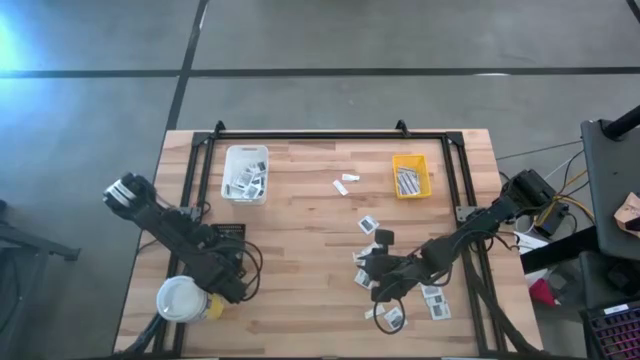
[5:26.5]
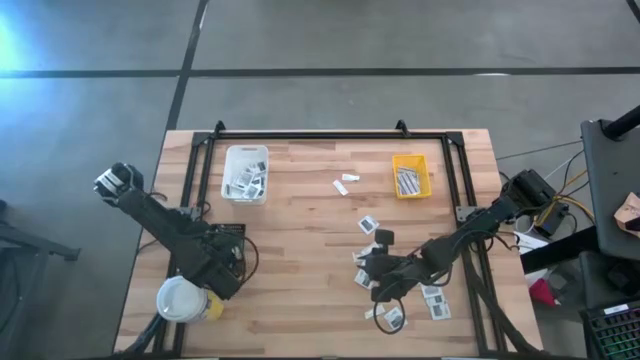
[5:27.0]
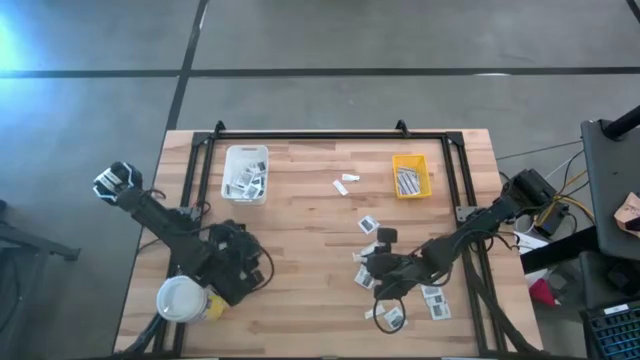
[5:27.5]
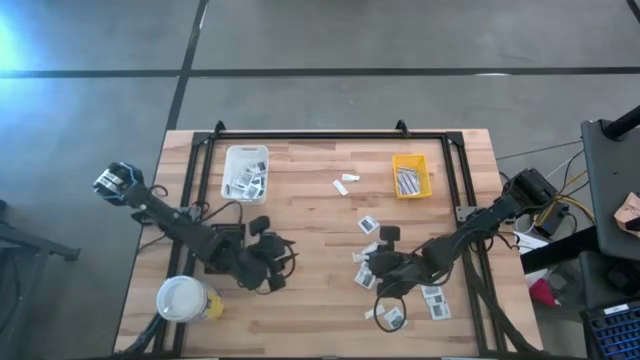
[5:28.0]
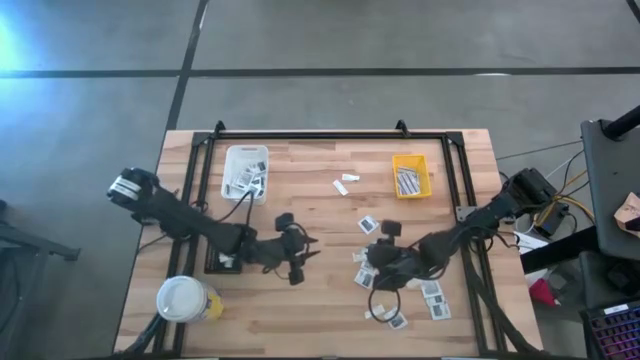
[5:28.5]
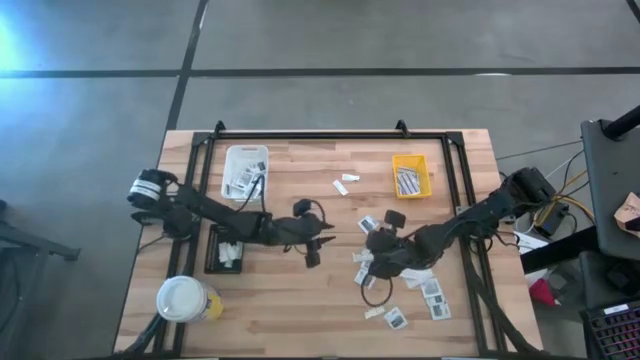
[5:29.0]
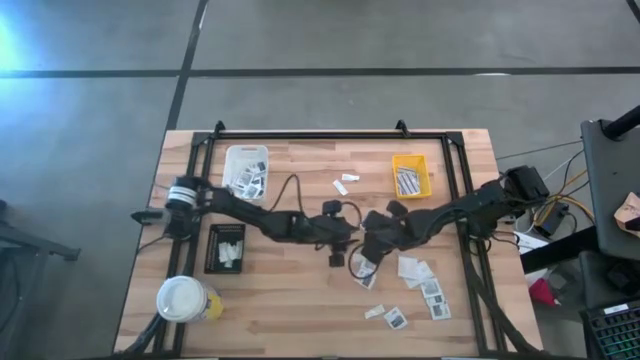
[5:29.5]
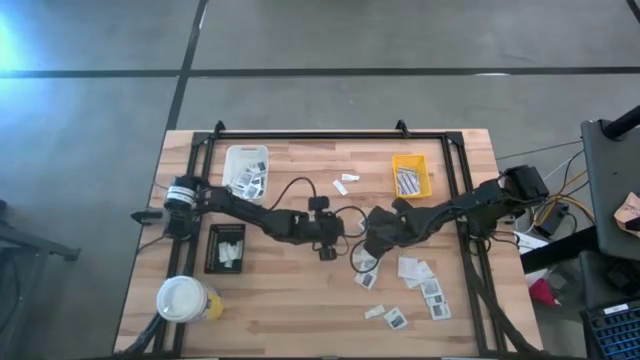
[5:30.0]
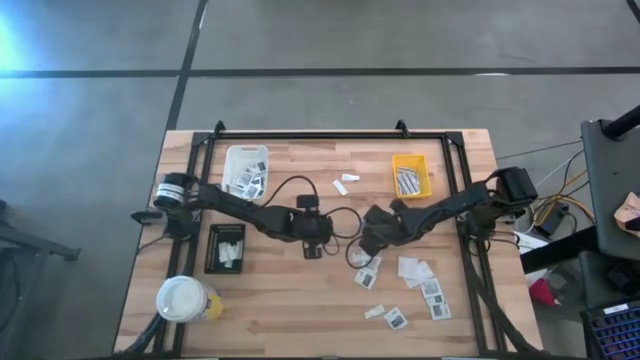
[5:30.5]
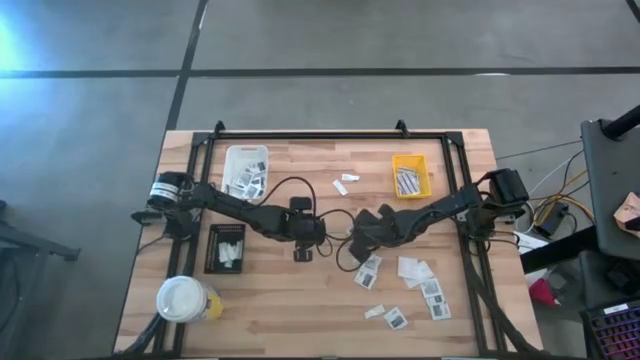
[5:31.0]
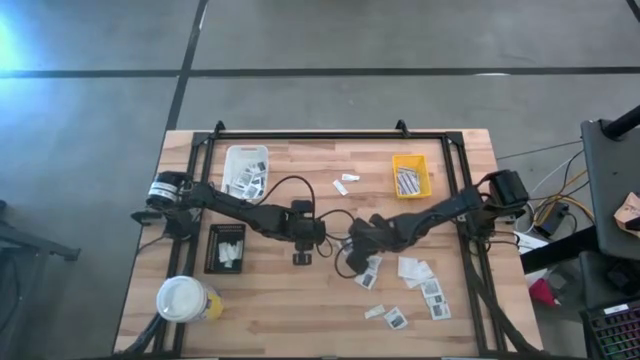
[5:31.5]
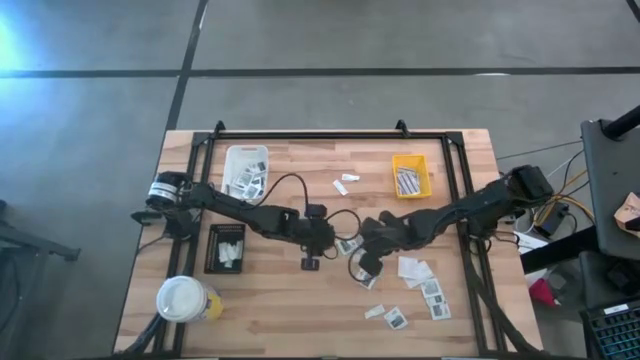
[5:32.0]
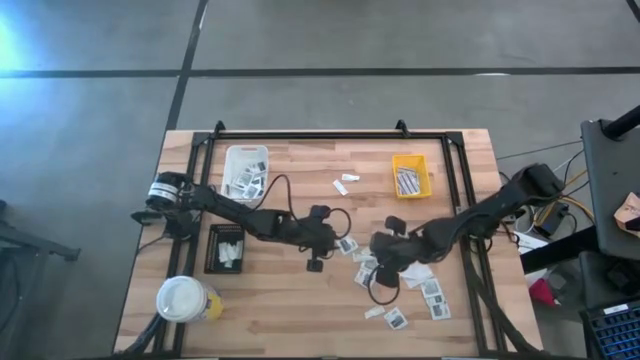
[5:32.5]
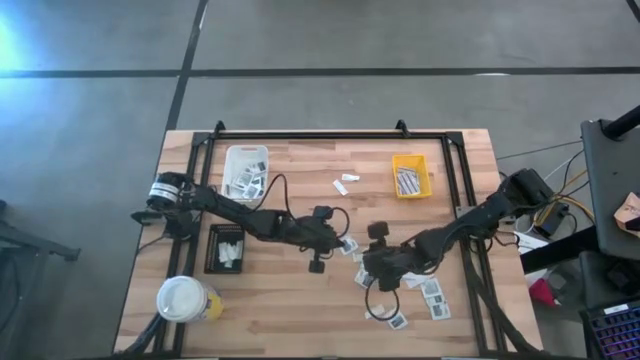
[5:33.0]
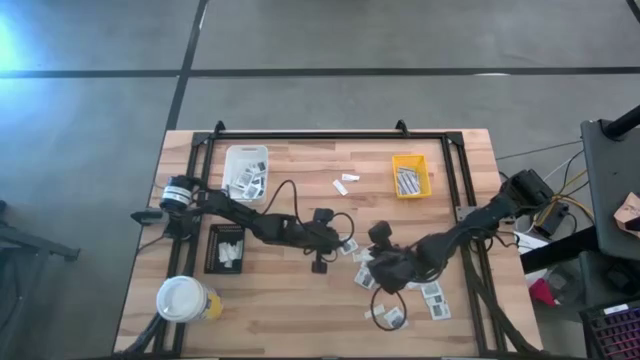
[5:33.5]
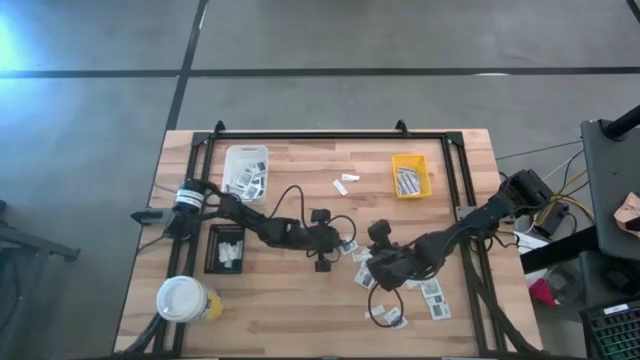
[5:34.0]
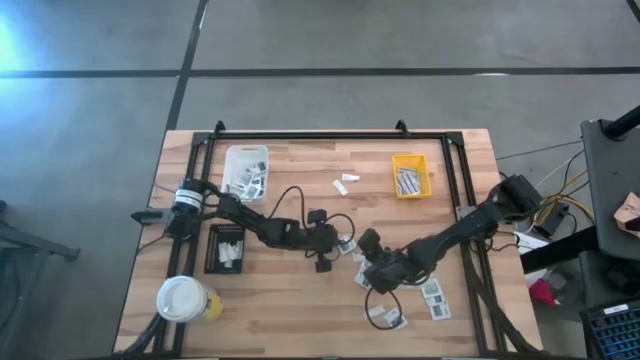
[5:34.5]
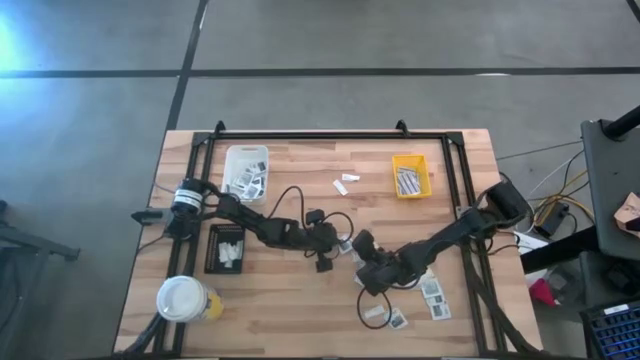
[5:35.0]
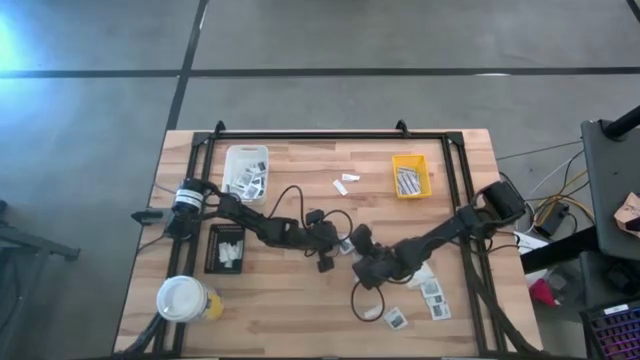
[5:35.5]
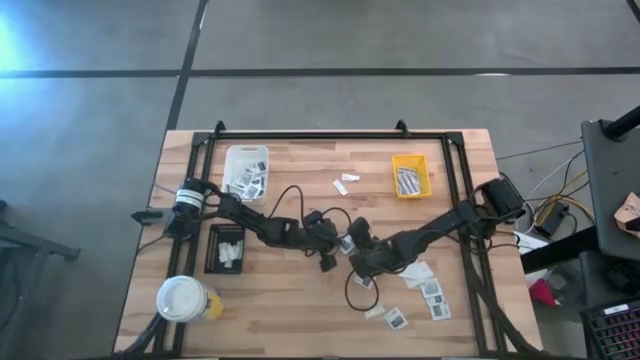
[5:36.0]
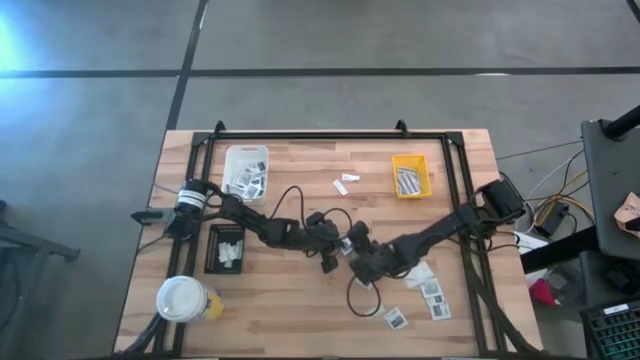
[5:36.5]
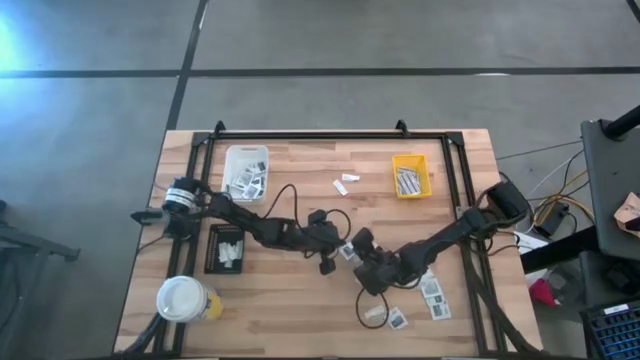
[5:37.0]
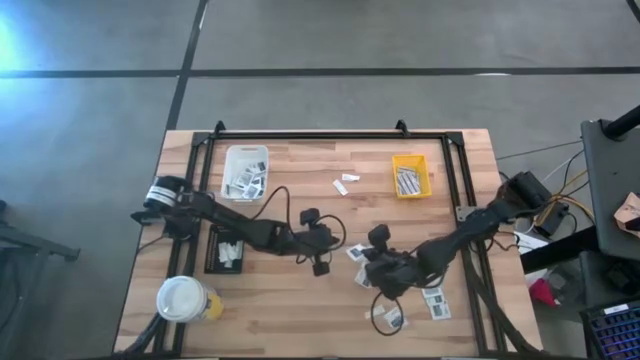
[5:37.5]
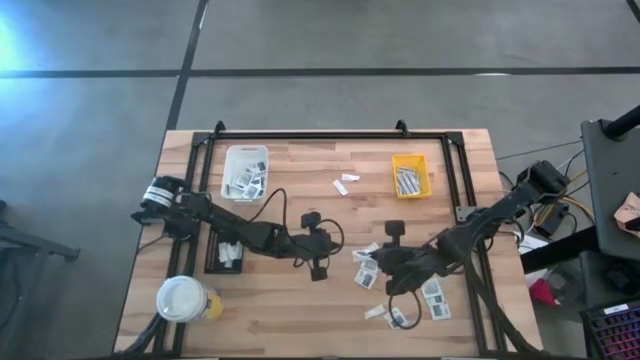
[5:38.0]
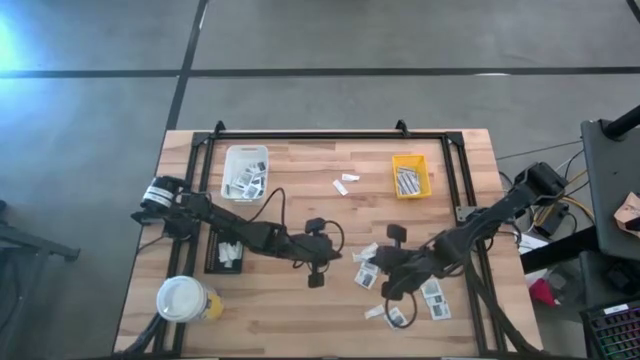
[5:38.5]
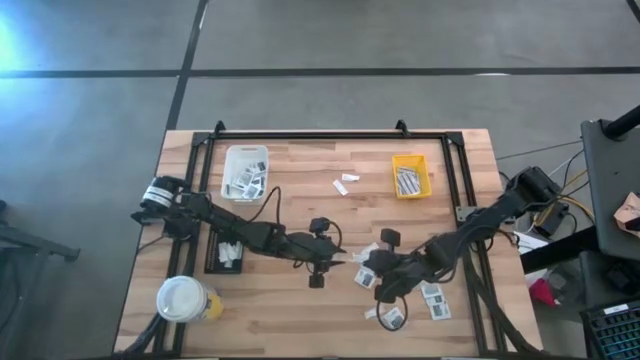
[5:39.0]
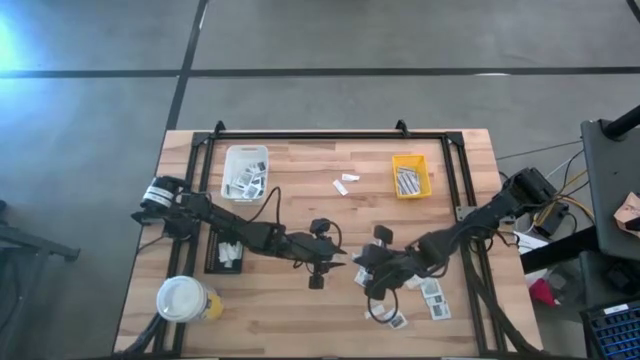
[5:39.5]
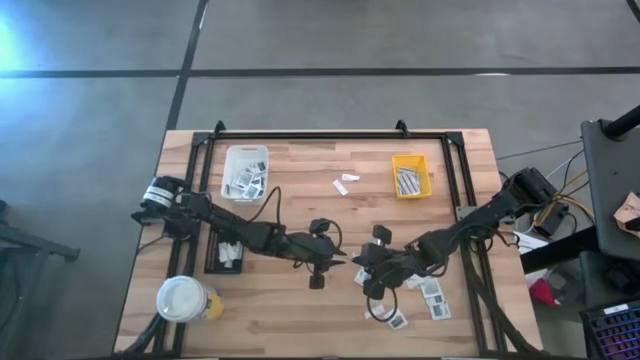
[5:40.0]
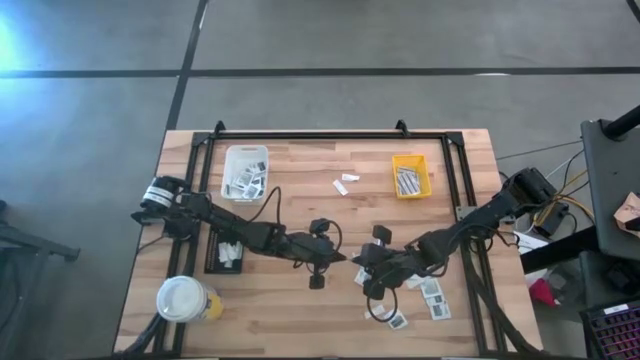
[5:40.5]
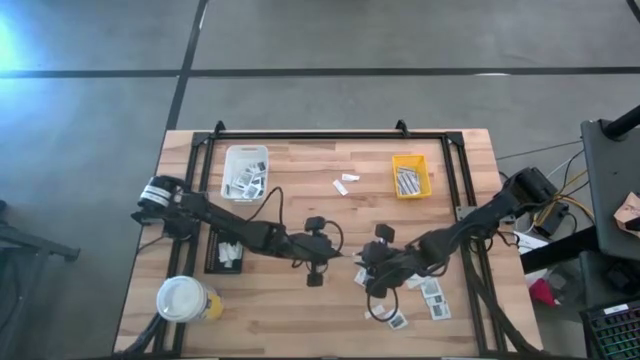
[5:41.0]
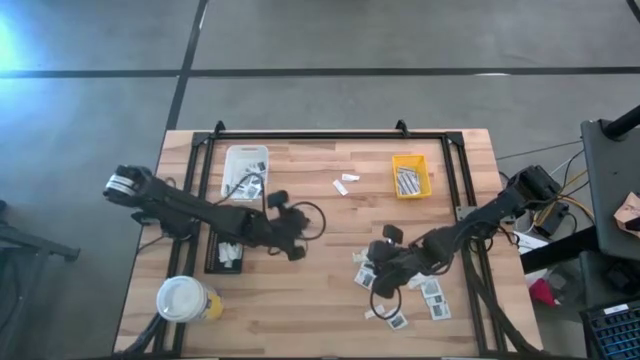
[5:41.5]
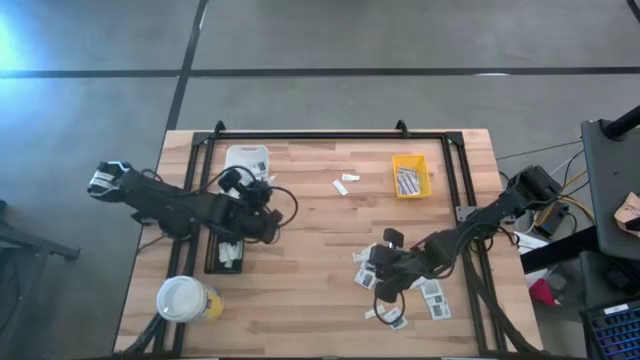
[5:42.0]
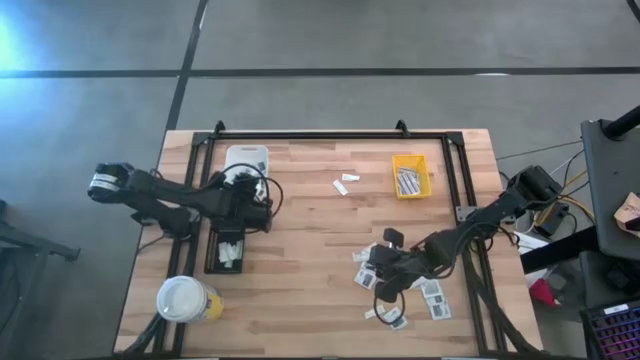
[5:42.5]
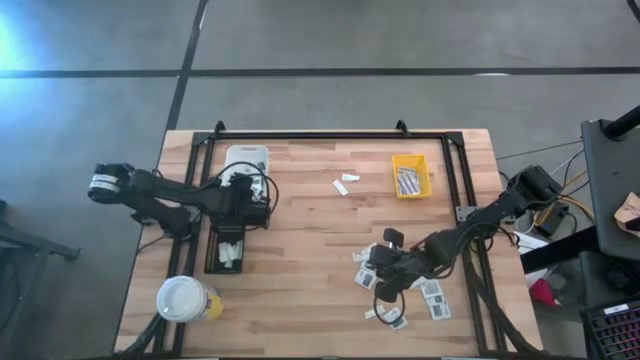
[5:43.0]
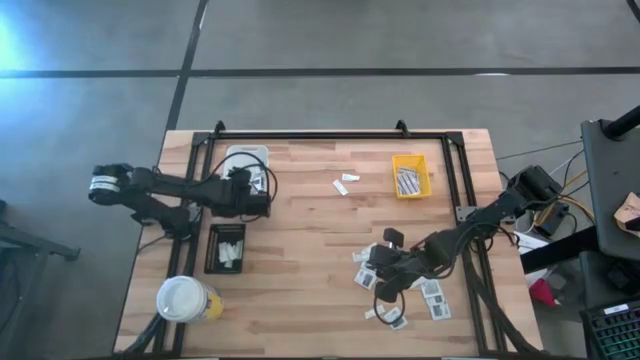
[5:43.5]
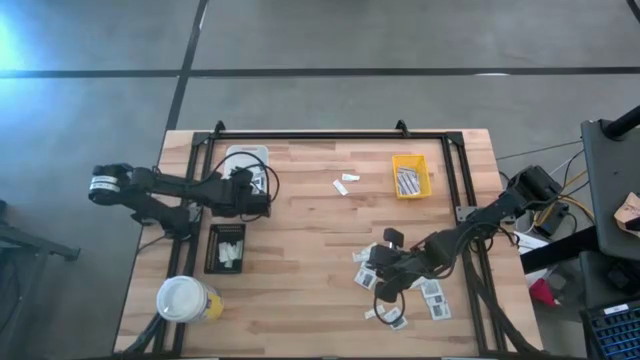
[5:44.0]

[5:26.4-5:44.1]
Task: Pick & Place First Aid Supplies
Put the gray towelette pack into the white bin

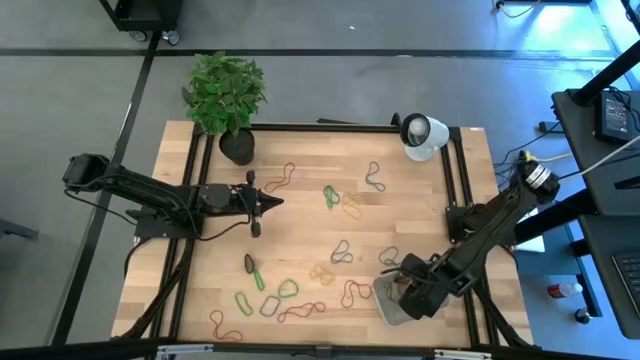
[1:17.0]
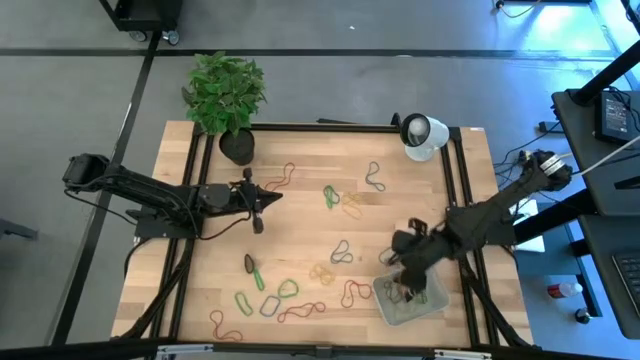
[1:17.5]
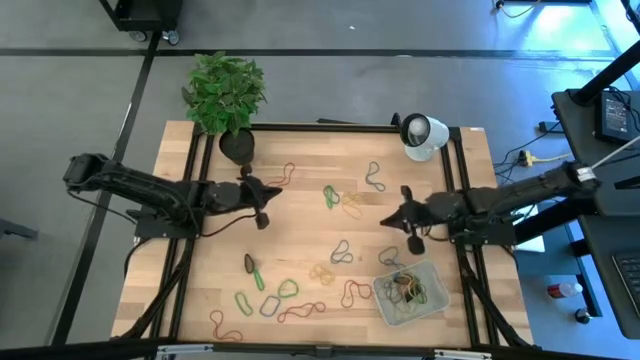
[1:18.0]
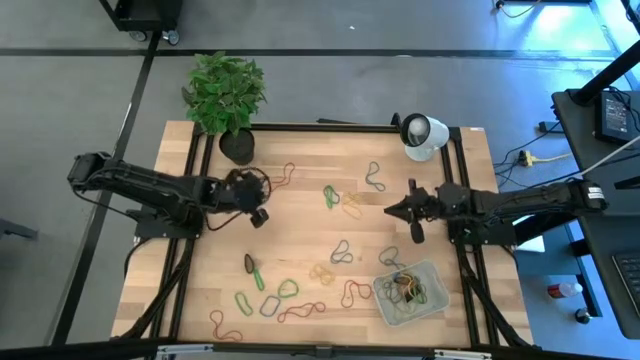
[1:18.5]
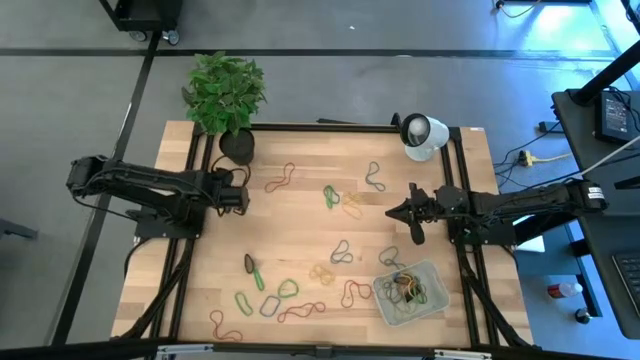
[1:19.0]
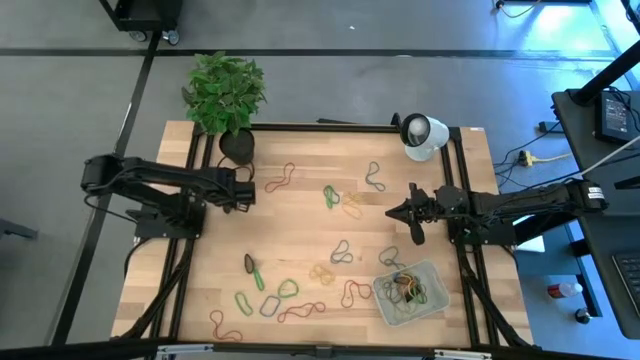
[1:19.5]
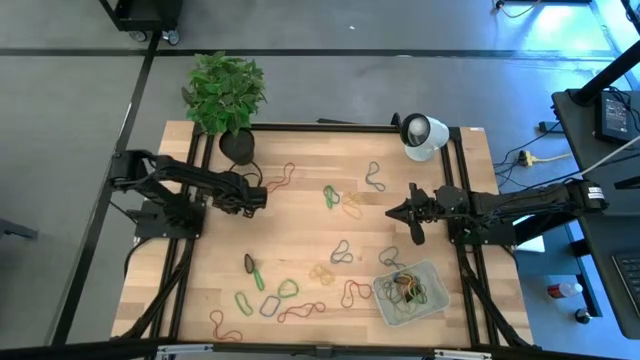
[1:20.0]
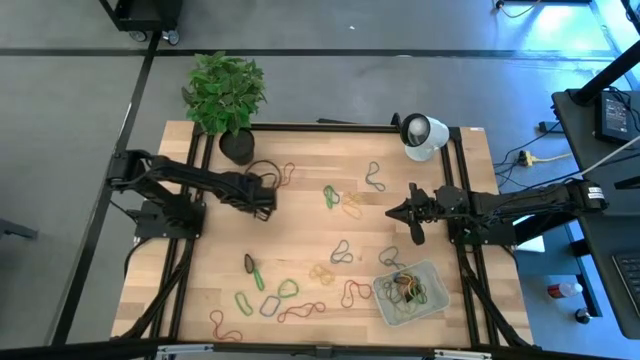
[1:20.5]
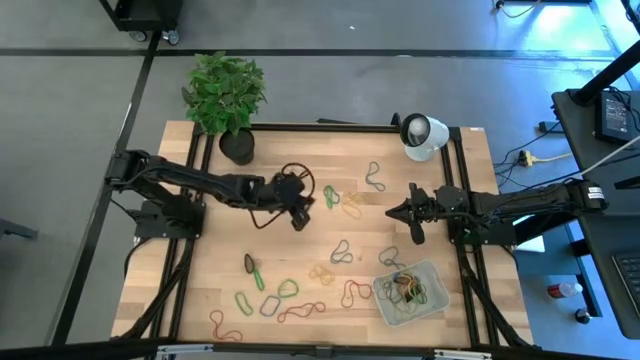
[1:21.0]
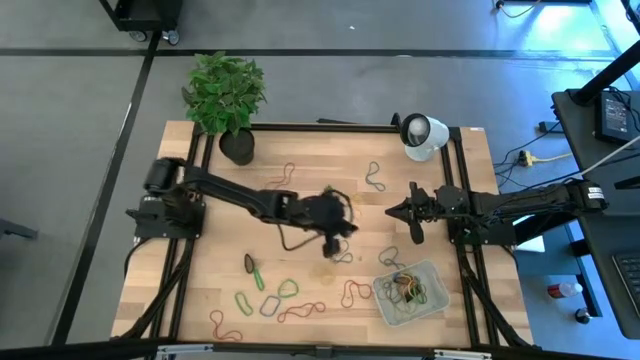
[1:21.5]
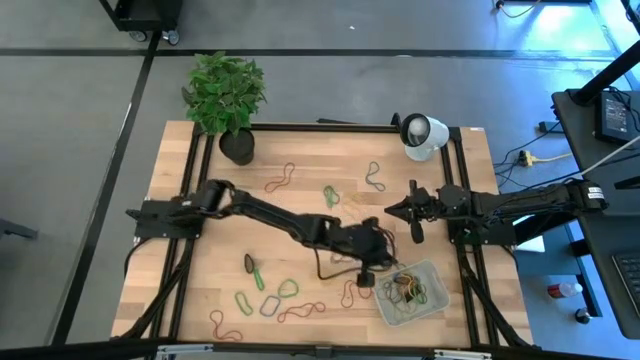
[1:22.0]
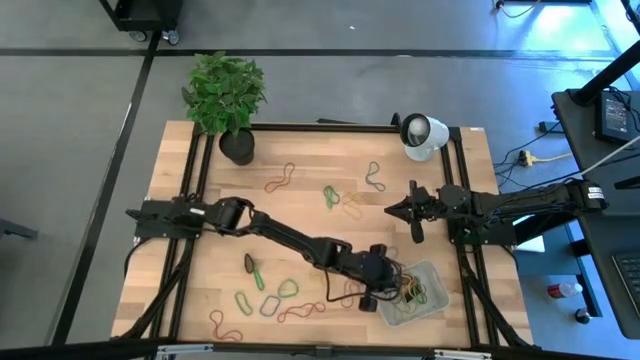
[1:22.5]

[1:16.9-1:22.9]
Task: Pick and place rubber bands into bin
Put the black rubber band into the white bin
